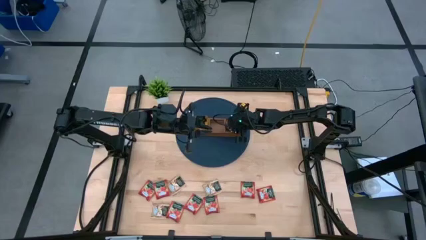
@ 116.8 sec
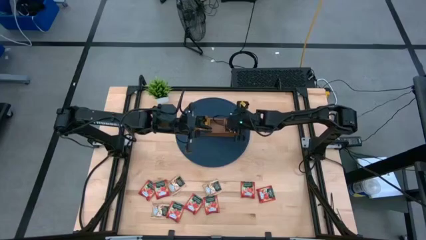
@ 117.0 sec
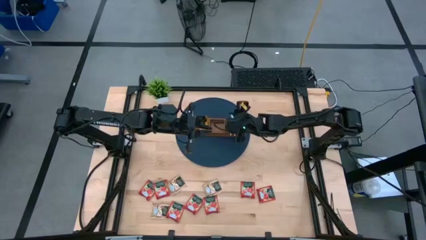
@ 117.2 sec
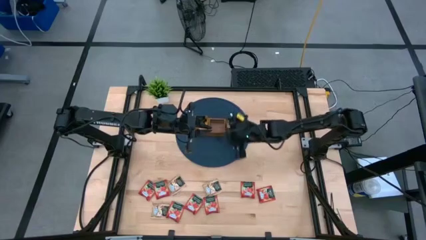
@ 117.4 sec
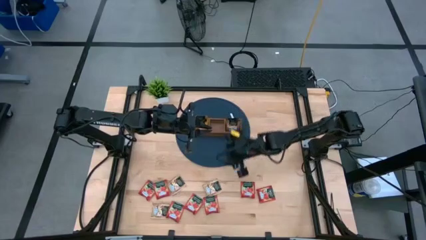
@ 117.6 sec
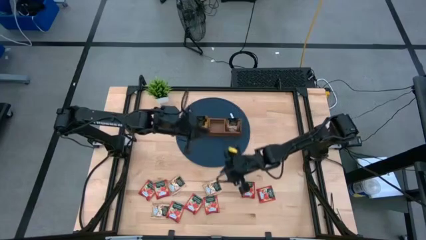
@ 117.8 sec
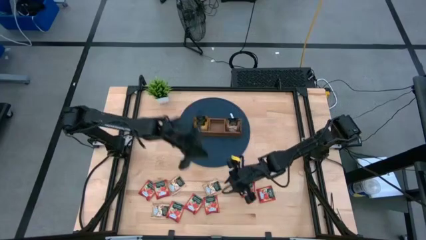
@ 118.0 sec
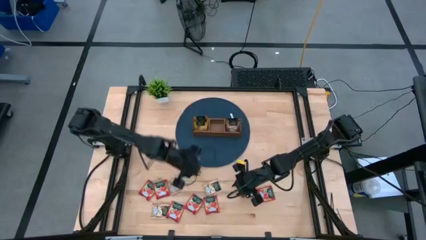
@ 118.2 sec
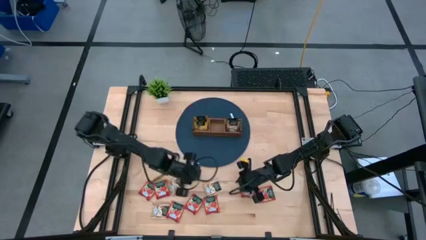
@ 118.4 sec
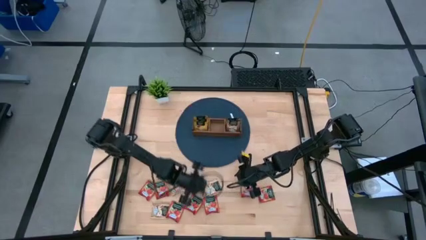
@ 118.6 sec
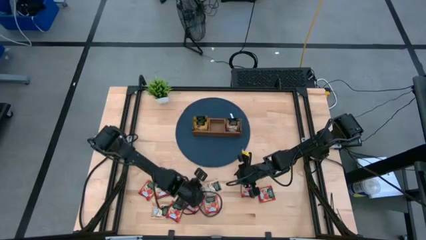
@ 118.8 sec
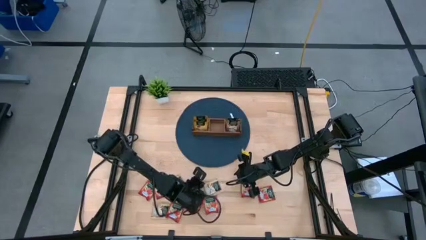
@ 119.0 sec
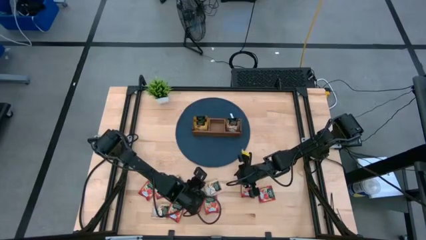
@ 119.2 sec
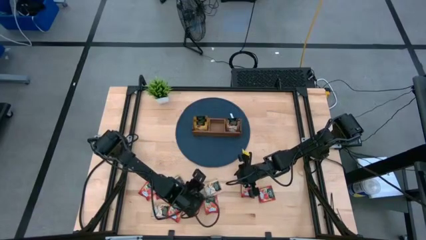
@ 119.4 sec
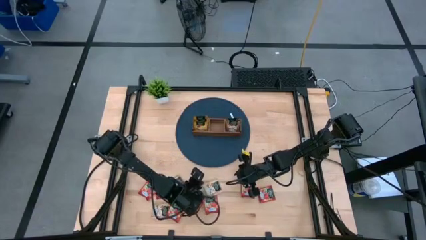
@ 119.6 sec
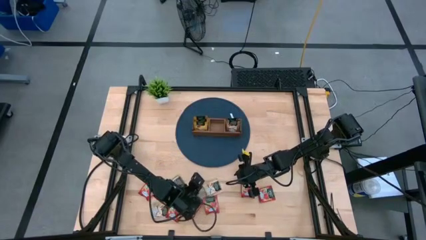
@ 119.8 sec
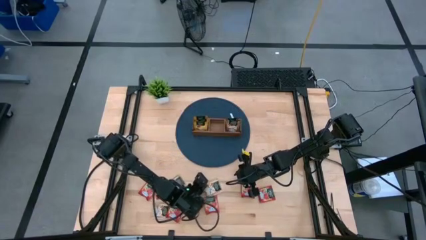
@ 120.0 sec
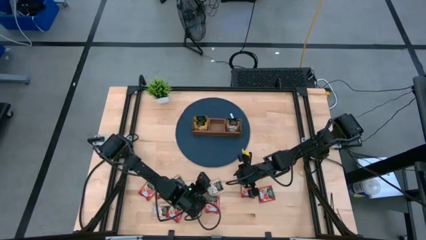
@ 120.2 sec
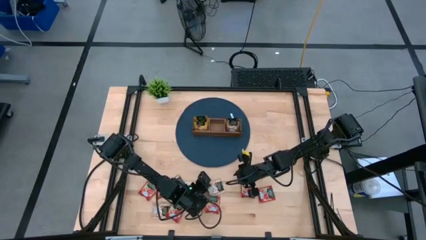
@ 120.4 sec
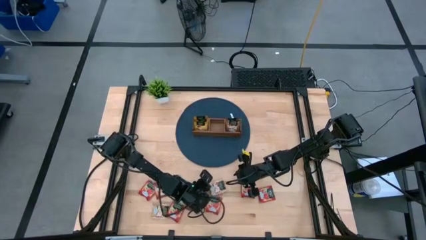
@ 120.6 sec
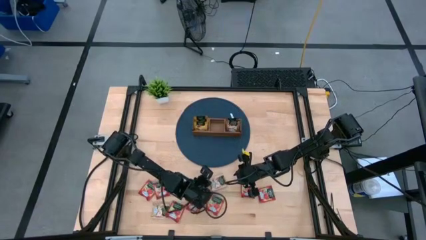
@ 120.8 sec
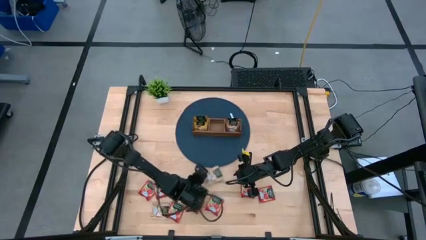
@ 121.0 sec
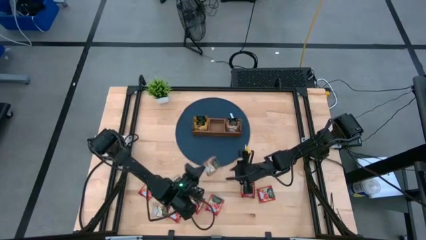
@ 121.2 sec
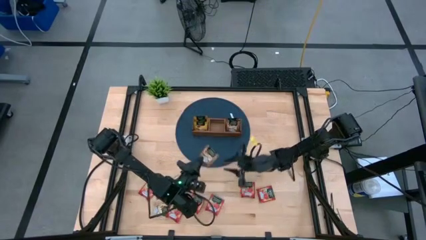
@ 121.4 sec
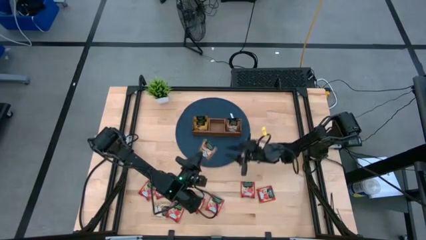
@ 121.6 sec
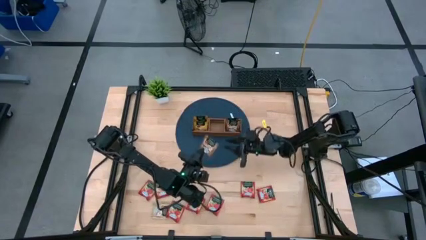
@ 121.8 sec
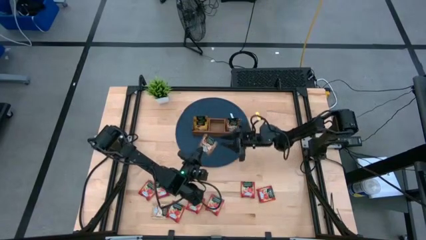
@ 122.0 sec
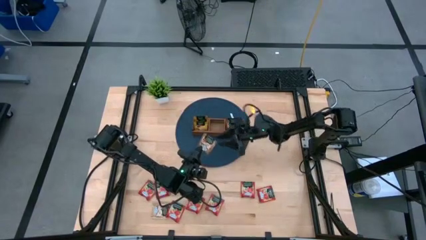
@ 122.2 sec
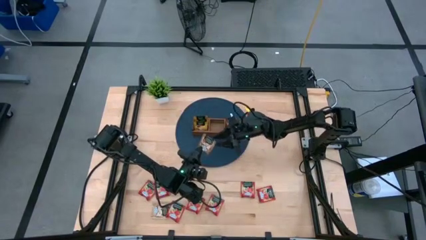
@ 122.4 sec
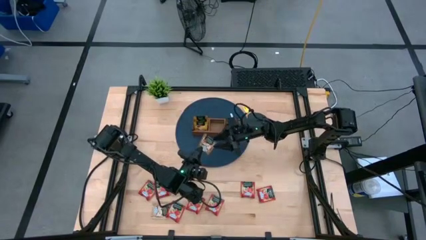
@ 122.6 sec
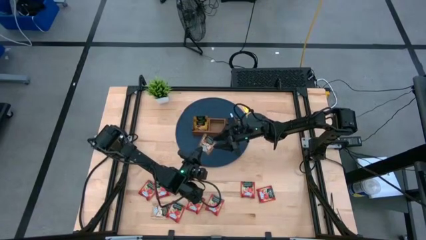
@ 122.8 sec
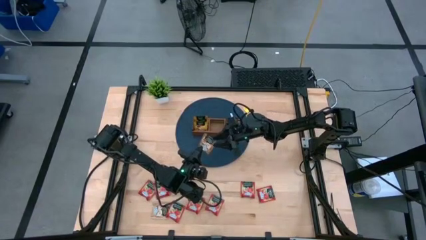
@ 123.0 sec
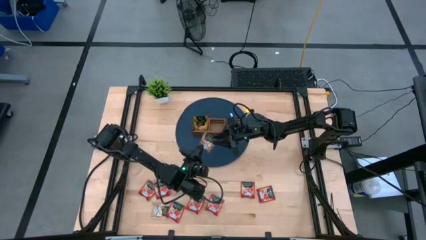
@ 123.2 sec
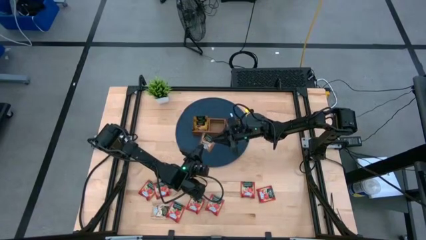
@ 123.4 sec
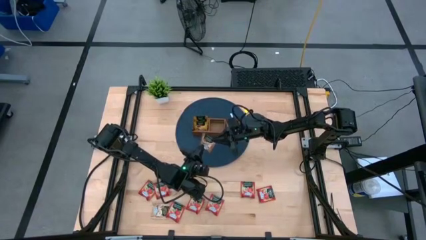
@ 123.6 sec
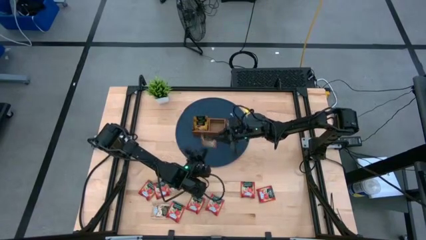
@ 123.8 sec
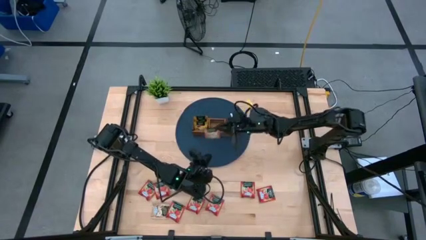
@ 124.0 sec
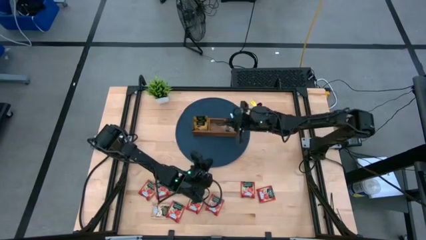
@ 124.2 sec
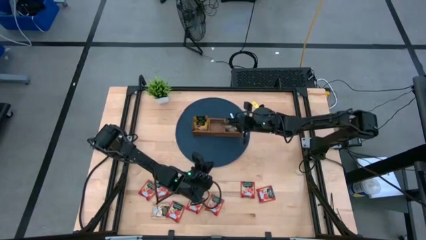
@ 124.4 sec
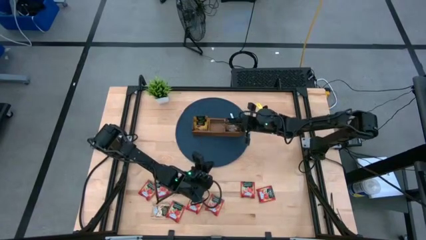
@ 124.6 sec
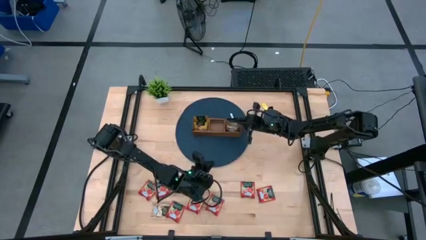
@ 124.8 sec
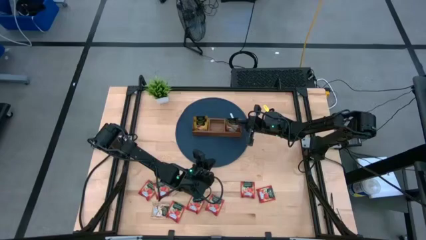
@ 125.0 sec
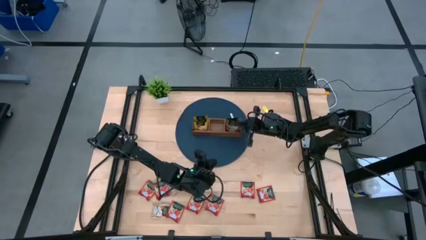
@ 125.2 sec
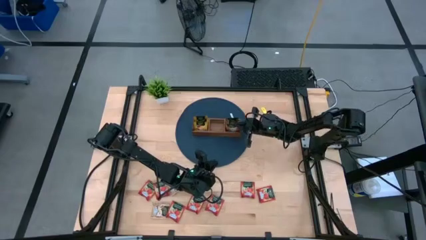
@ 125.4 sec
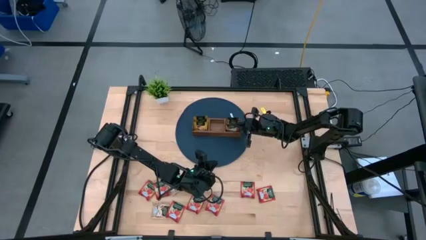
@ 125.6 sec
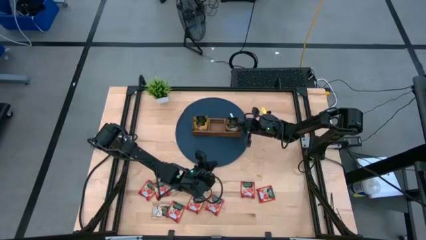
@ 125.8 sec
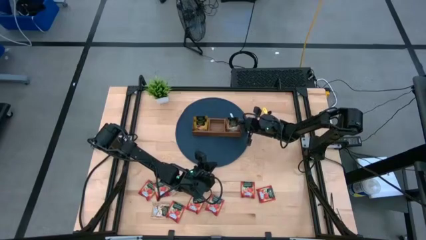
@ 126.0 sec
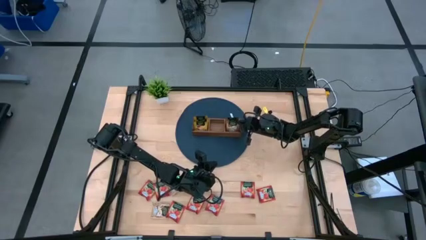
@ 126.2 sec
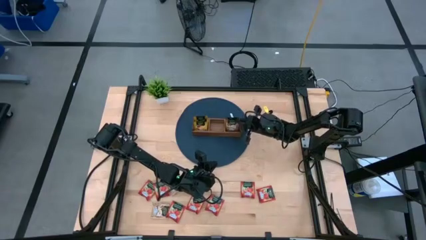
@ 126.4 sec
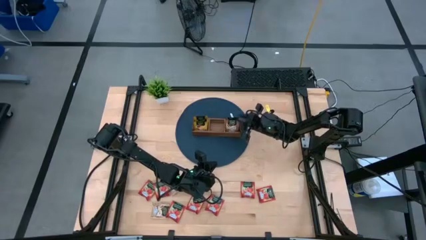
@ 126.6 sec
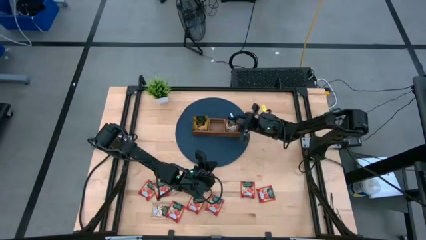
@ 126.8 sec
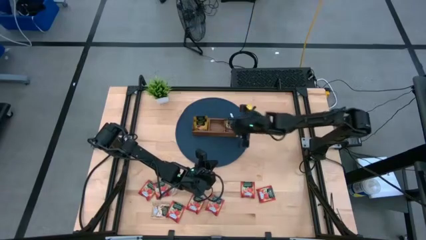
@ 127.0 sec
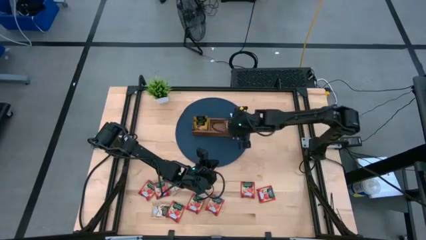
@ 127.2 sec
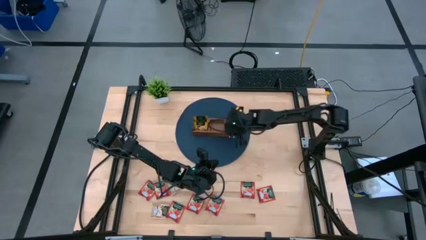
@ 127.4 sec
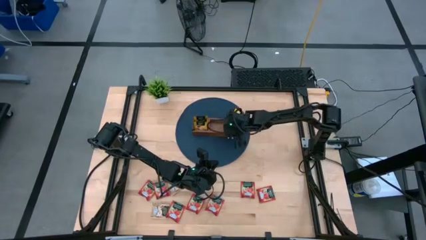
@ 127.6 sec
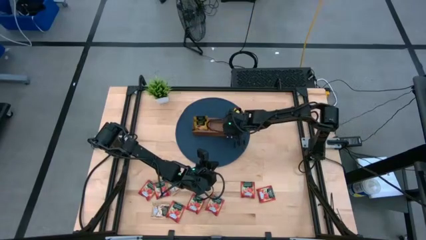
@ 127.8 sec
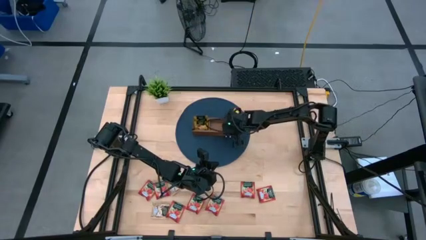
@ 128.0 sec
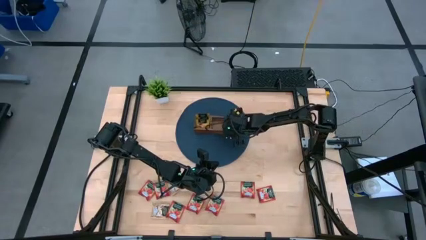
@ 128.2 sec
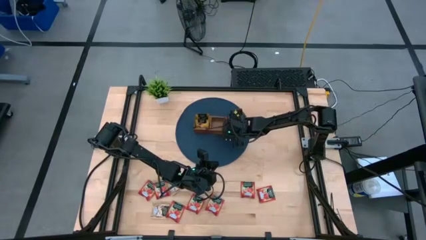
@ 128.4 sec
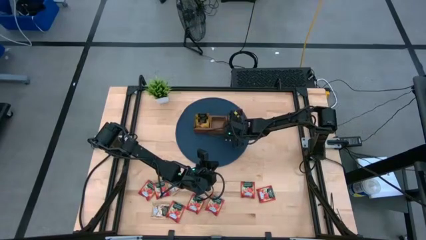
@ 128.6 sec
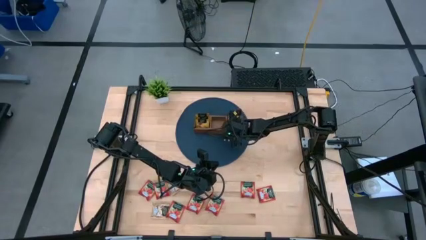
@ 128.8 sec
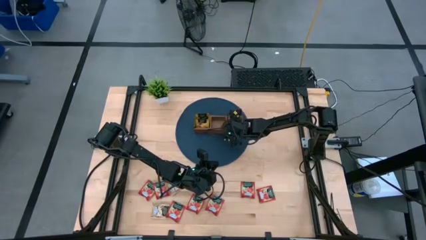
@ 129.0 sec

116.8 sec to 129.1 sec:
Task: Pick & Place Tea
Put the brown tea bag into the right section of the wooden organizer
